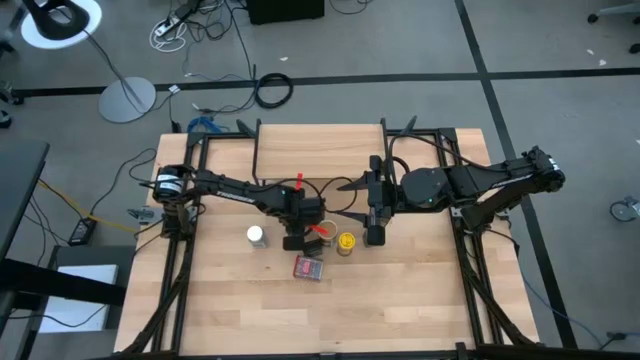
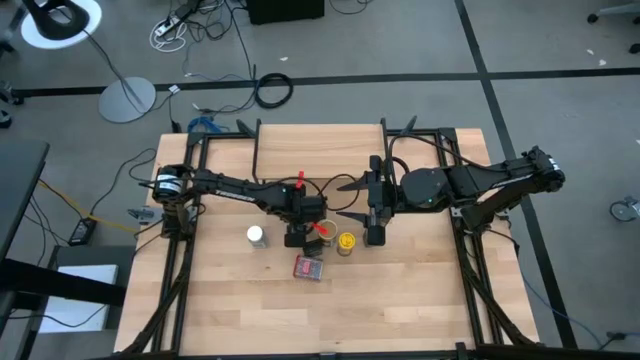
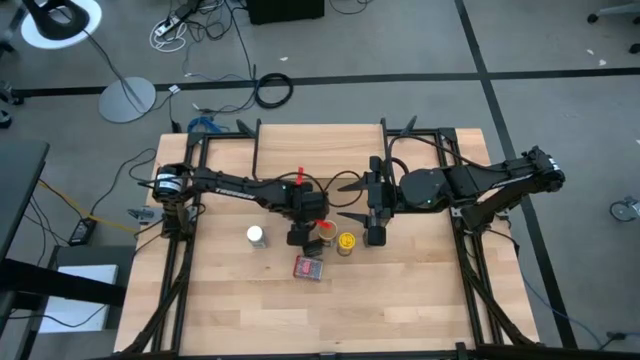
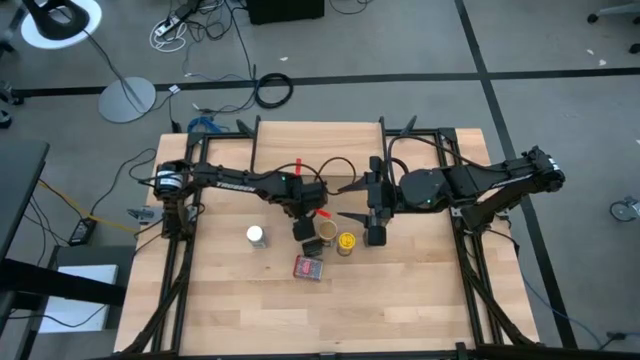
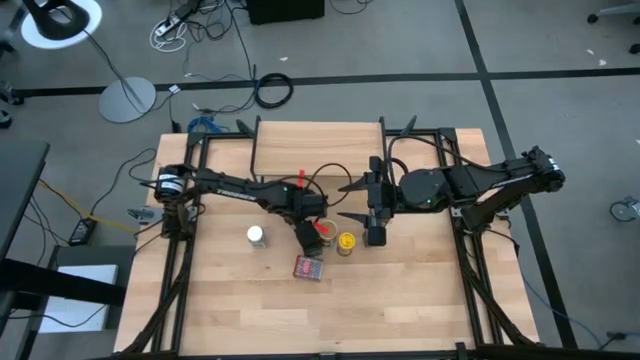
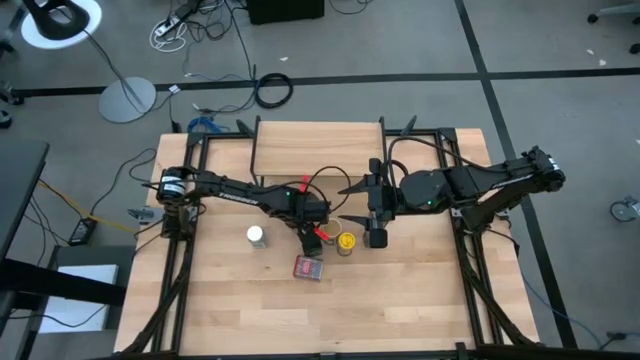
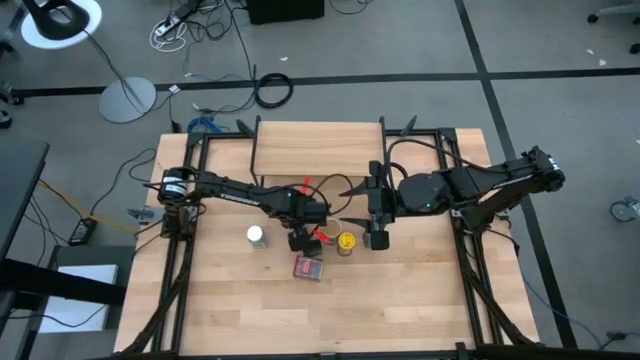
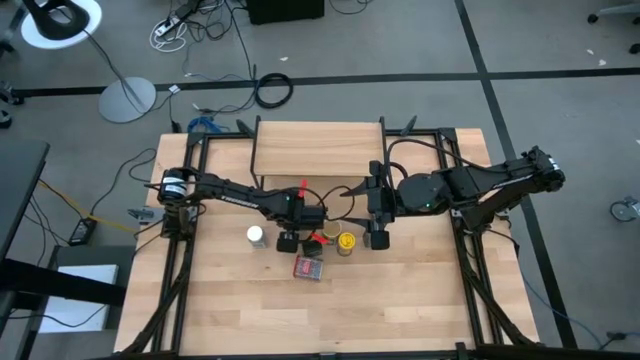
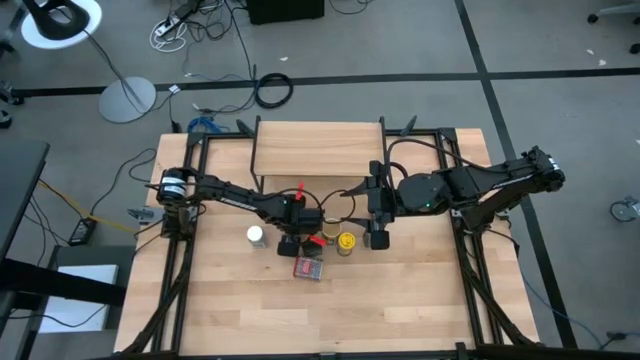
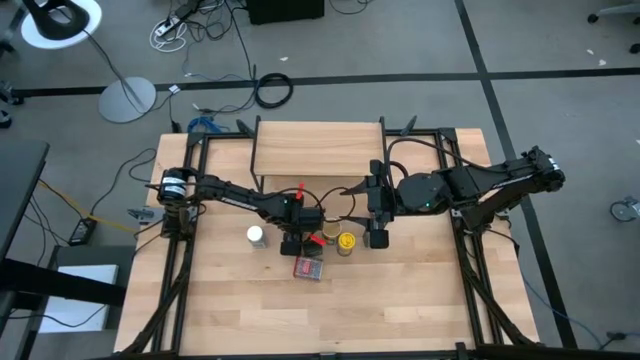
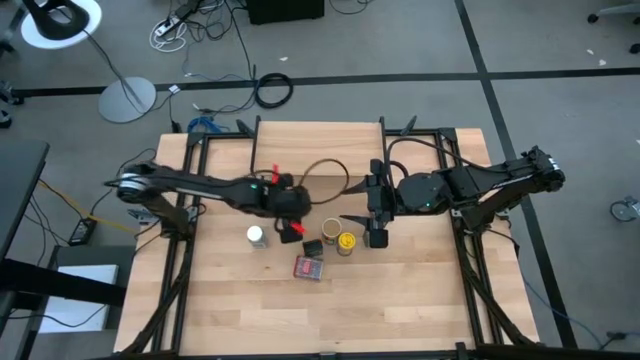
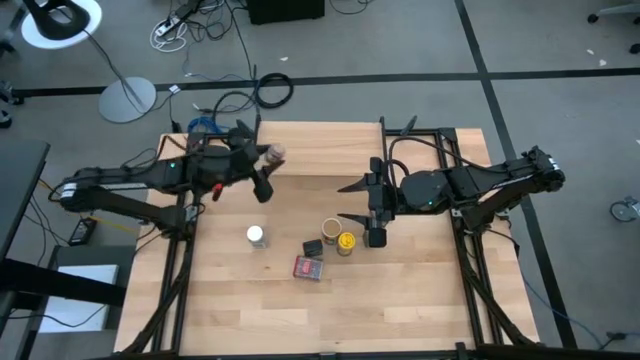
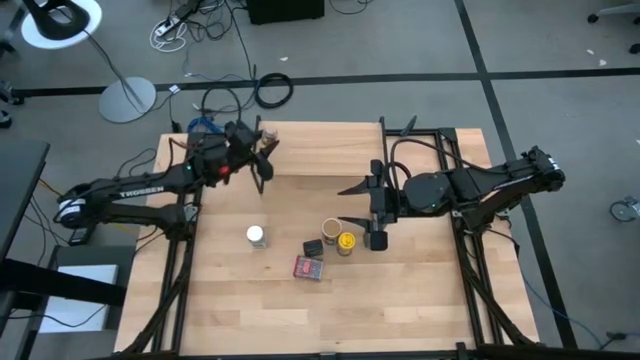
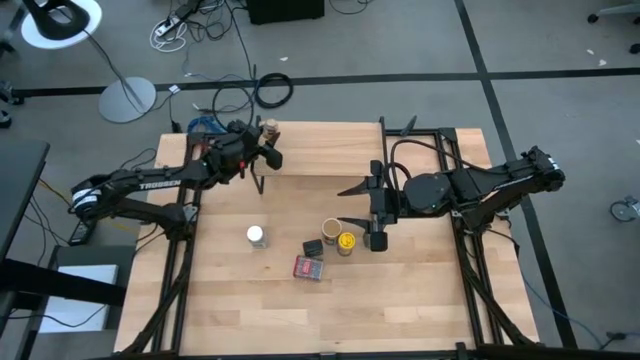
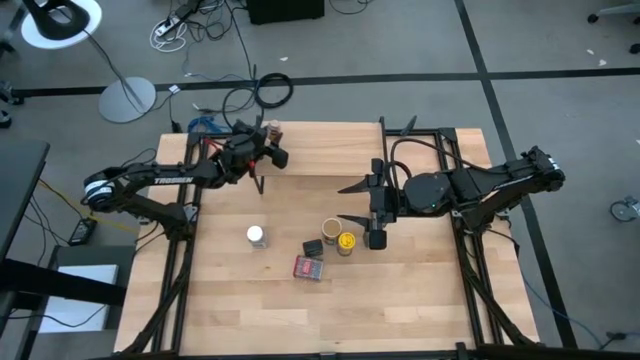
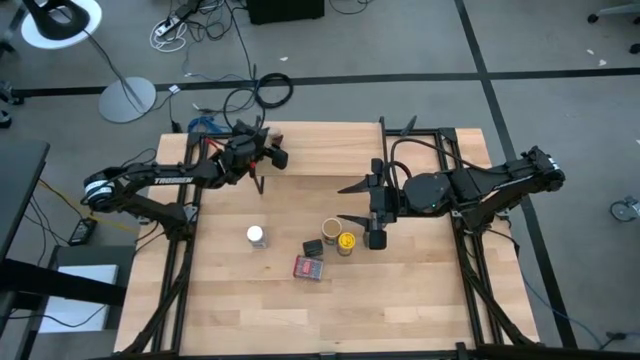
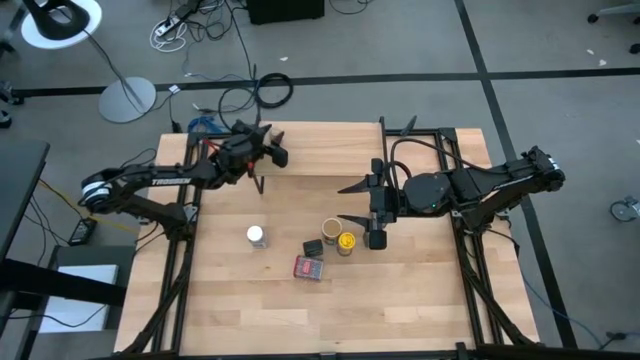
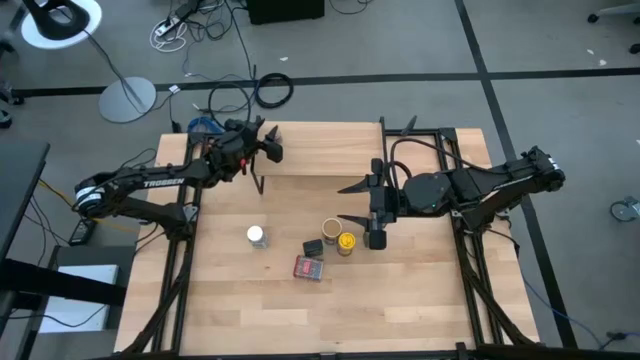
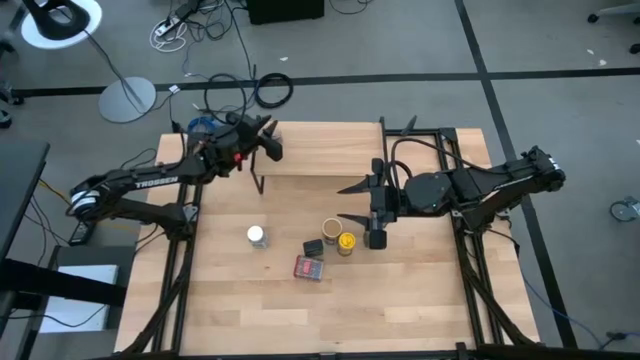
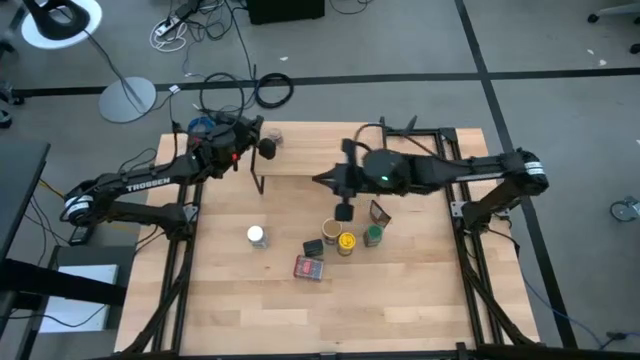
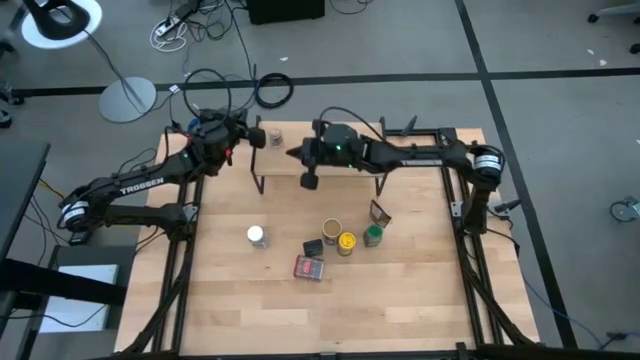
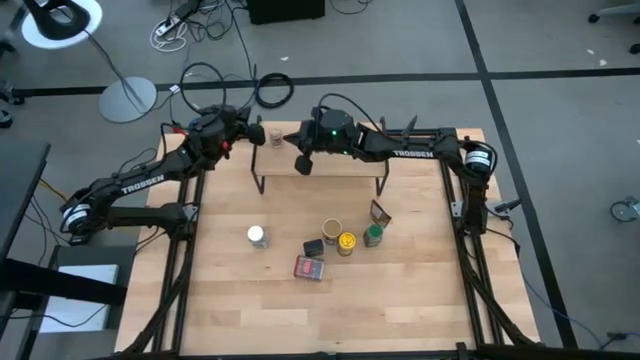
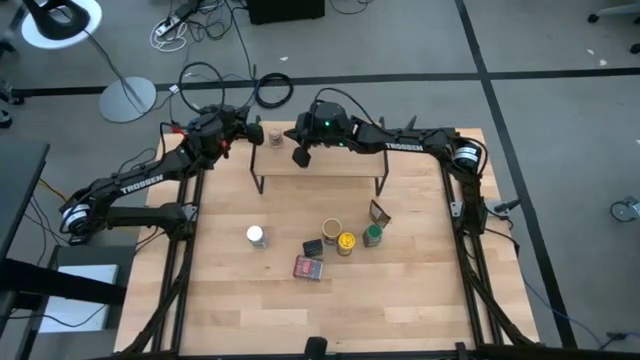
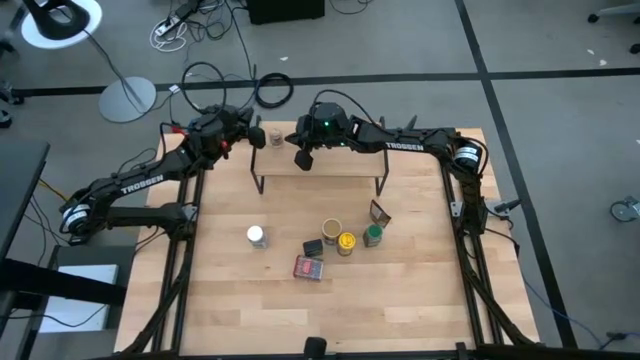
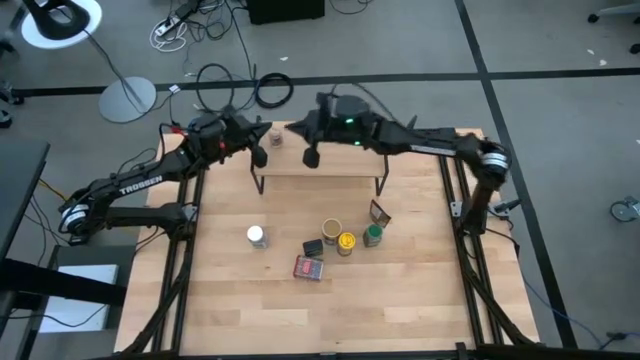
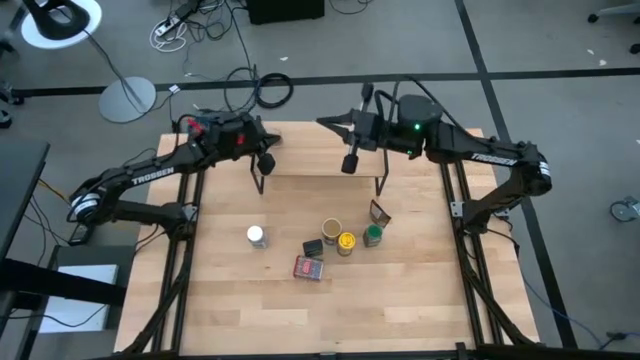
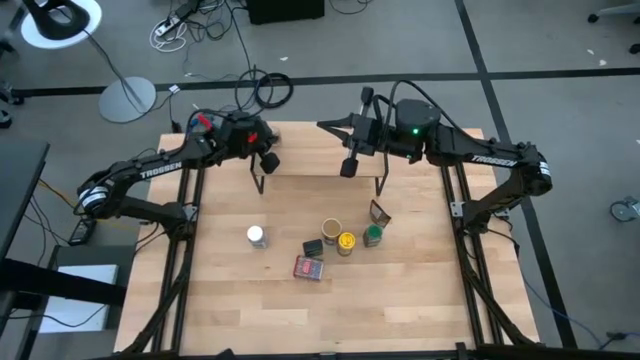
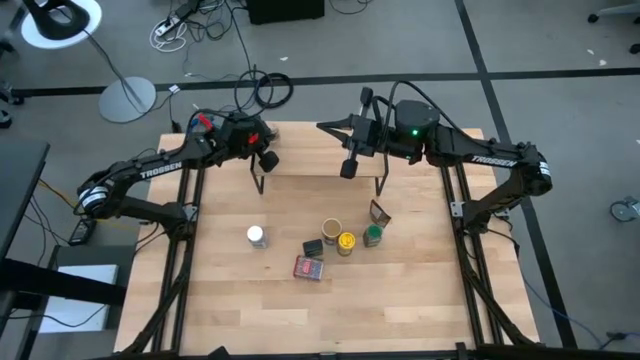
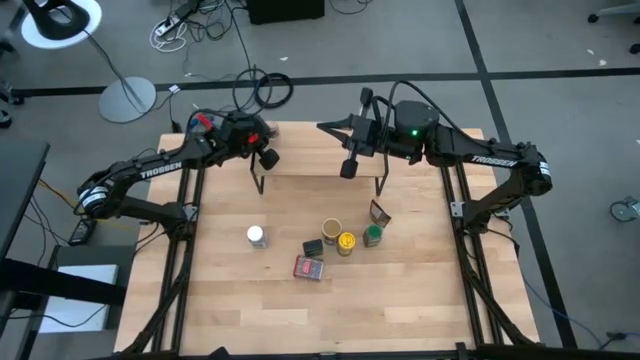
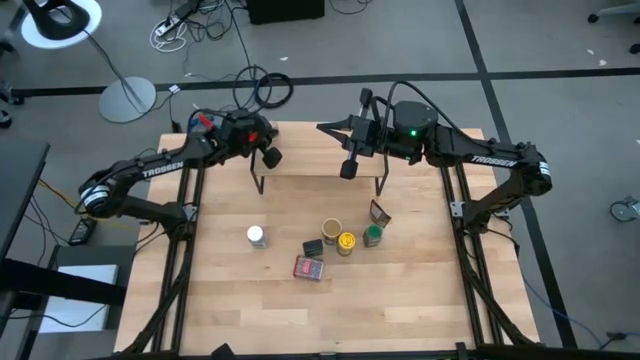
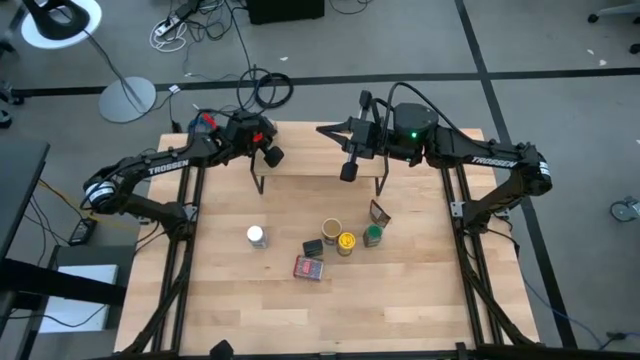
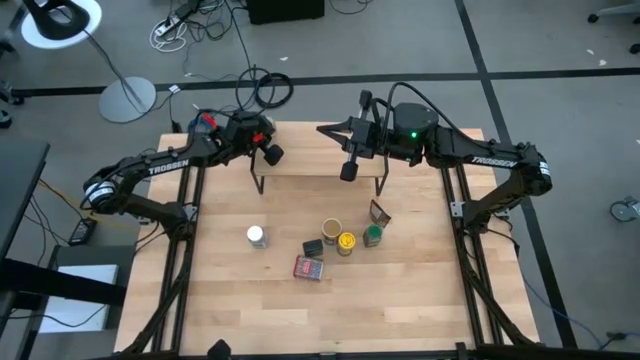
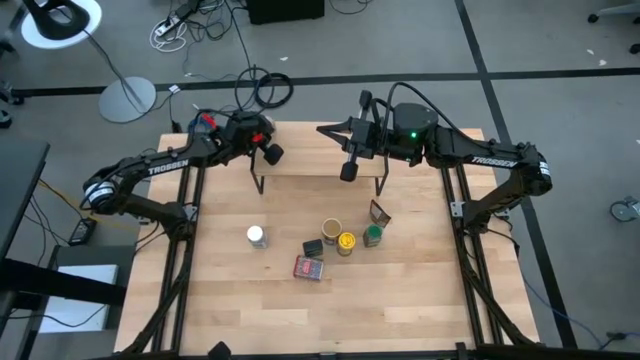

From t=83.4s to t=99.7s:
Task: Shelf spices
Put the orange seasoning bottle on the shelf

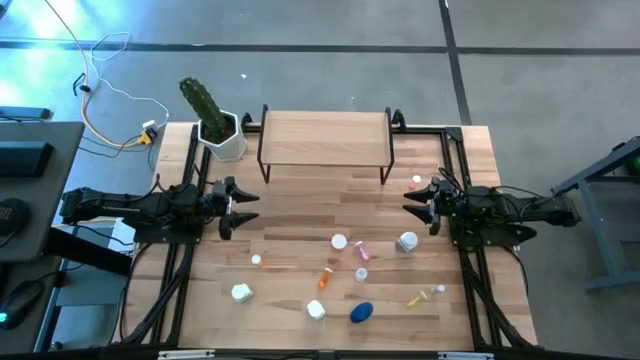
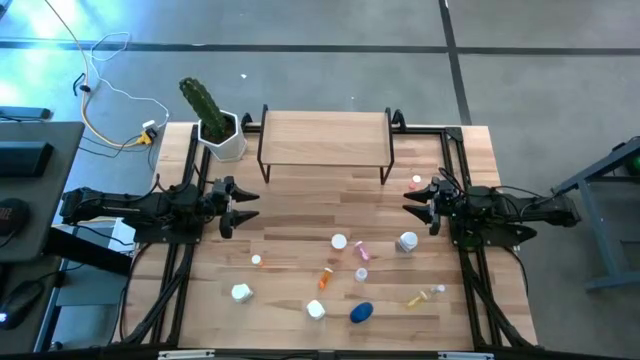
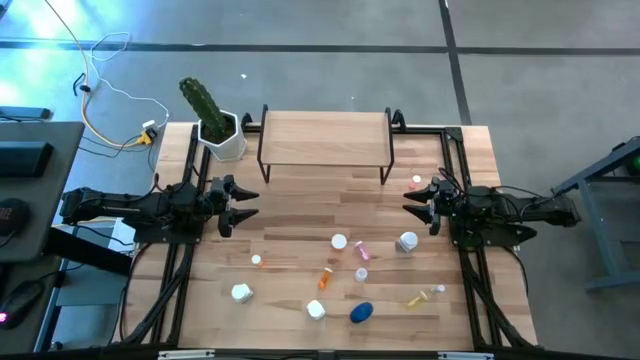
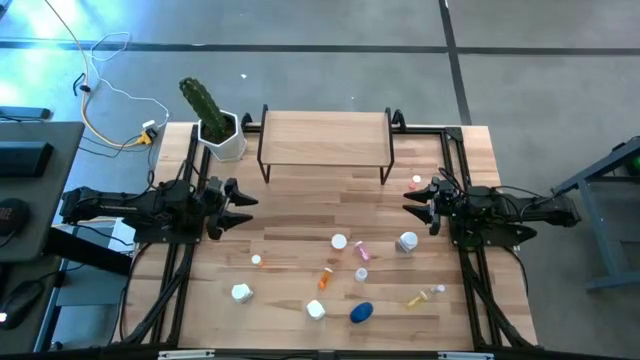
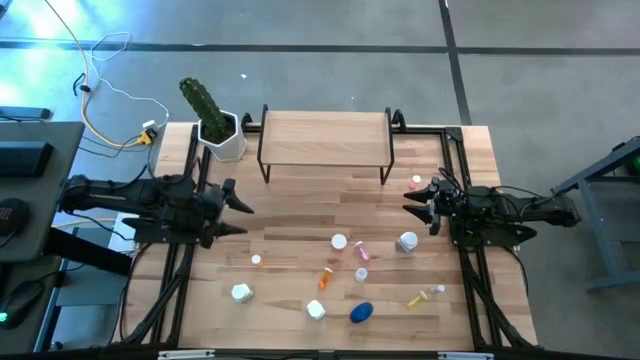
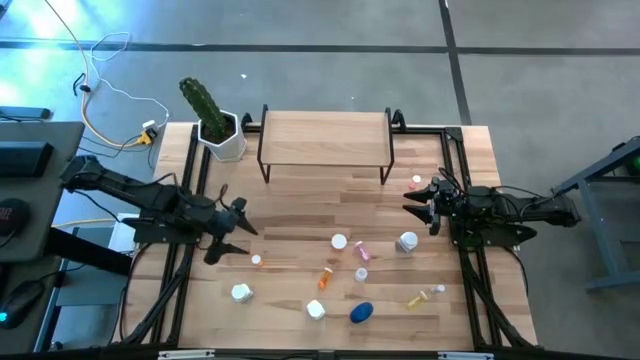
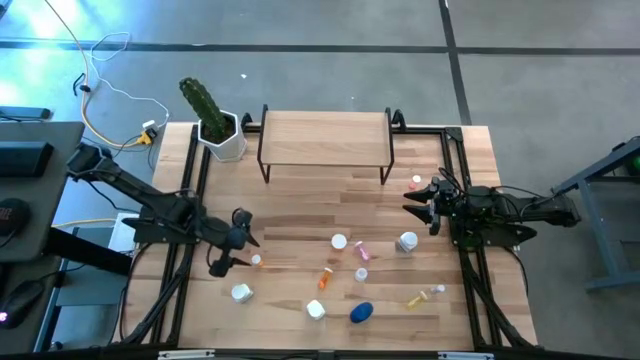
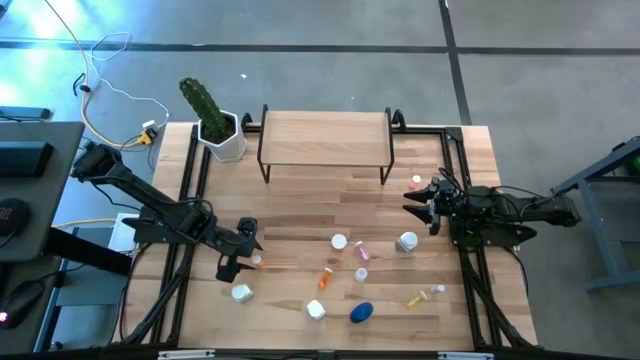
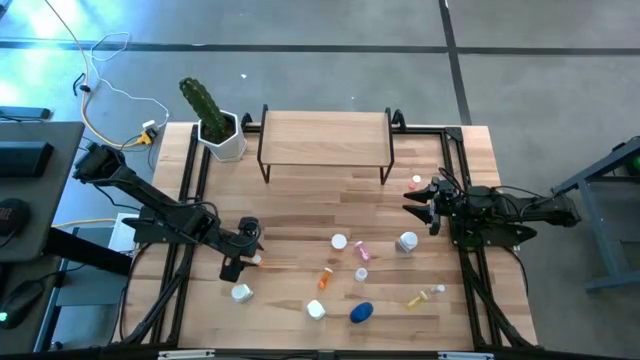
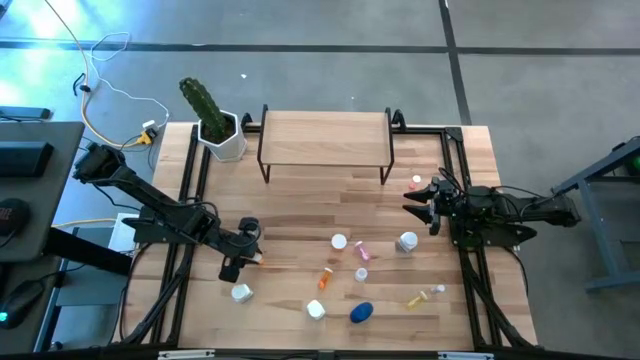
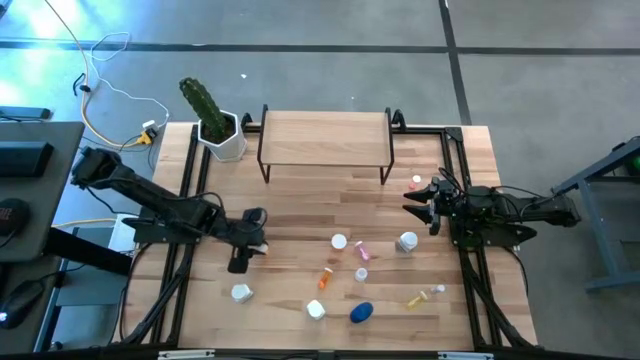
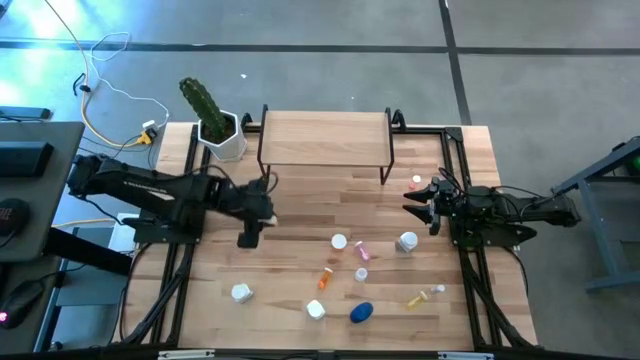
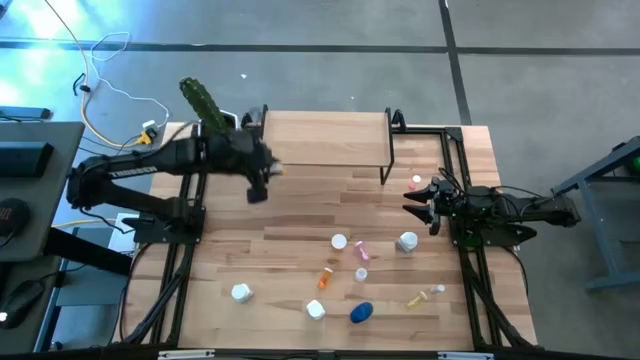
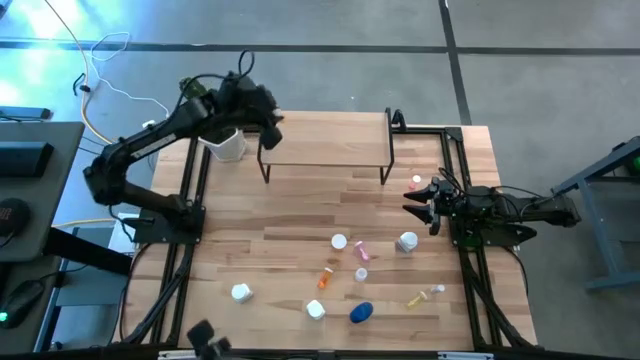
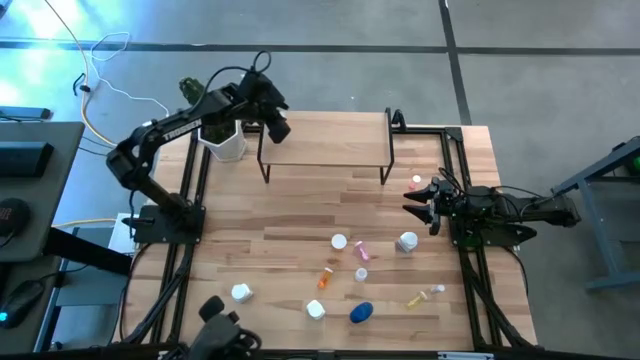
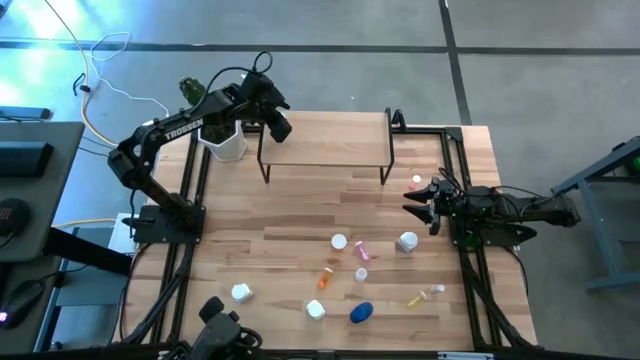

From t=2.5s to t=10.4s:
Task: Pick and place medicine bottles onto shelf by color
Put the left orange pill bottle on the shelf
